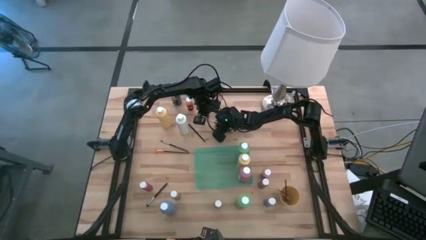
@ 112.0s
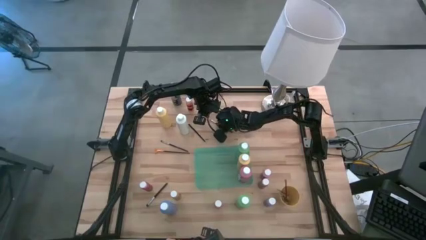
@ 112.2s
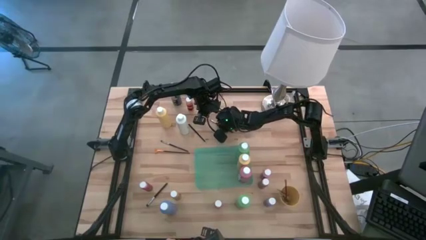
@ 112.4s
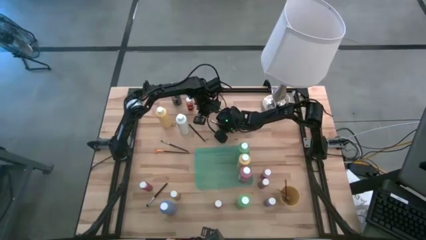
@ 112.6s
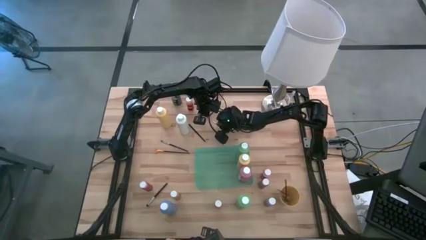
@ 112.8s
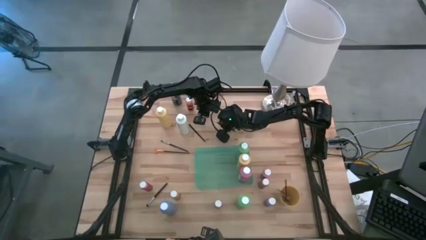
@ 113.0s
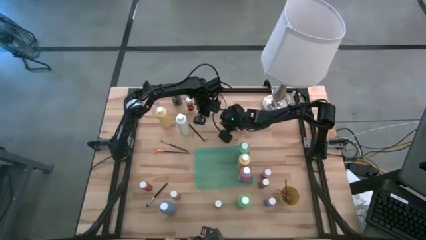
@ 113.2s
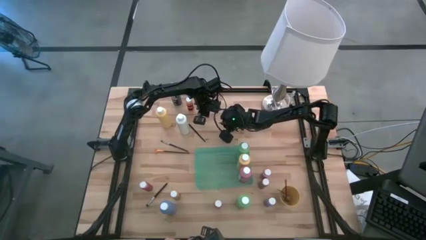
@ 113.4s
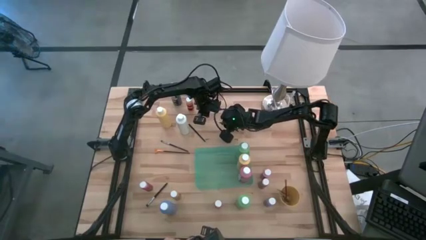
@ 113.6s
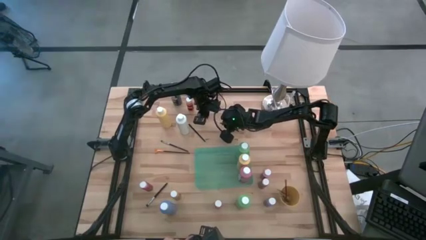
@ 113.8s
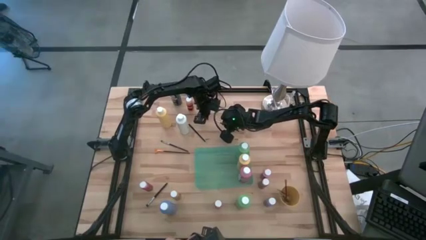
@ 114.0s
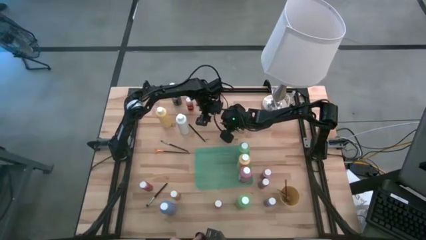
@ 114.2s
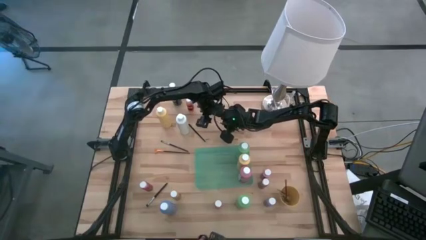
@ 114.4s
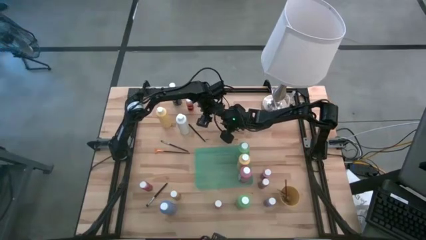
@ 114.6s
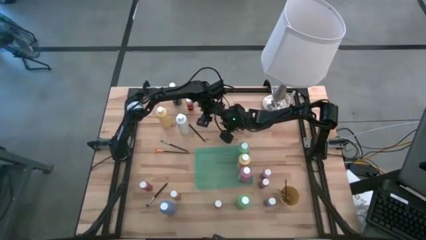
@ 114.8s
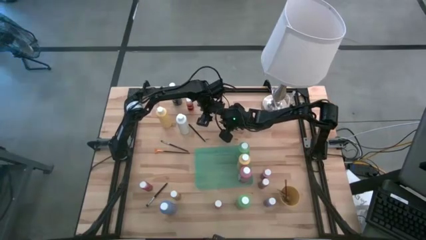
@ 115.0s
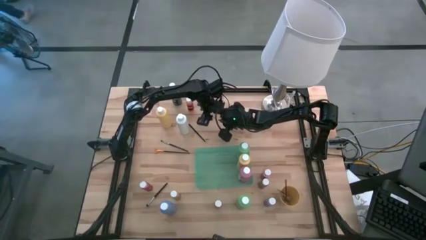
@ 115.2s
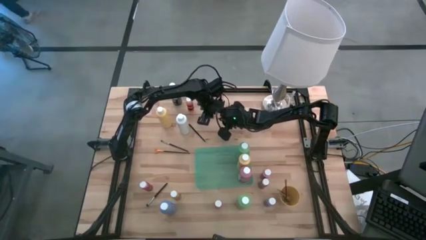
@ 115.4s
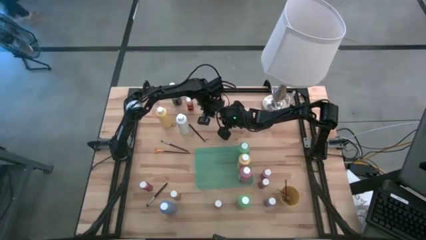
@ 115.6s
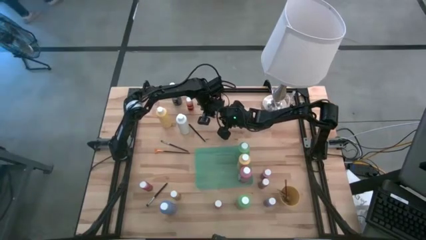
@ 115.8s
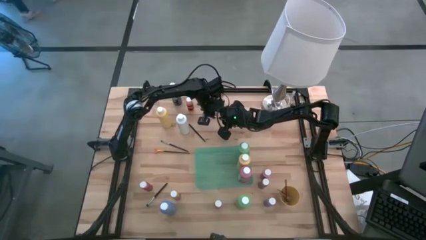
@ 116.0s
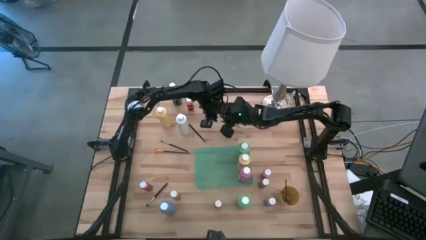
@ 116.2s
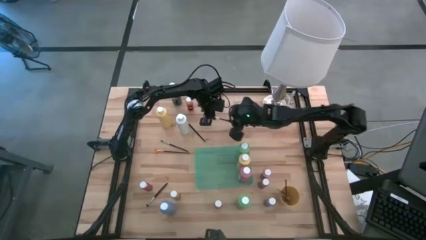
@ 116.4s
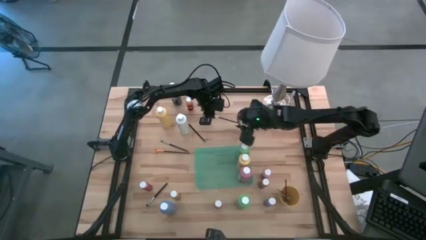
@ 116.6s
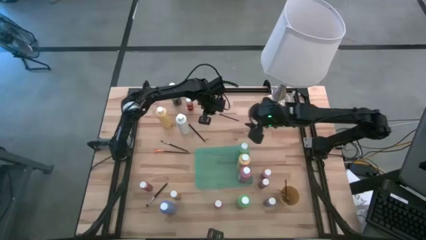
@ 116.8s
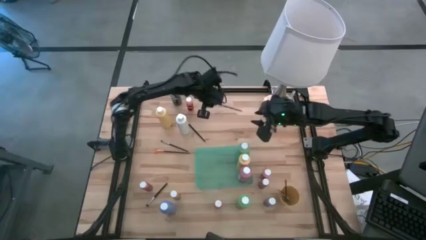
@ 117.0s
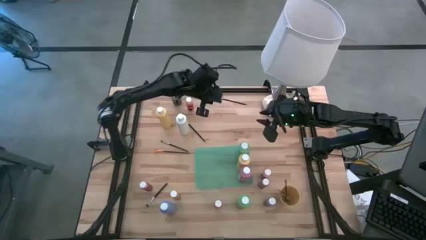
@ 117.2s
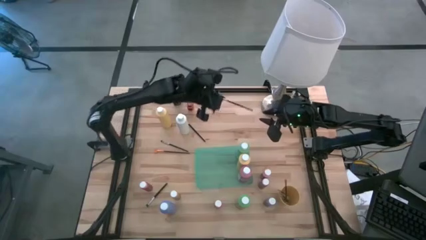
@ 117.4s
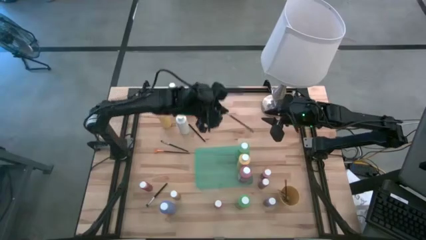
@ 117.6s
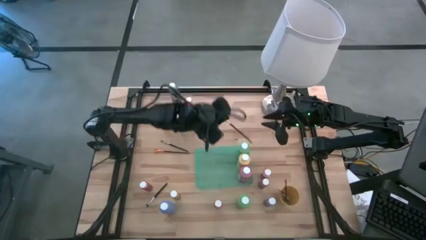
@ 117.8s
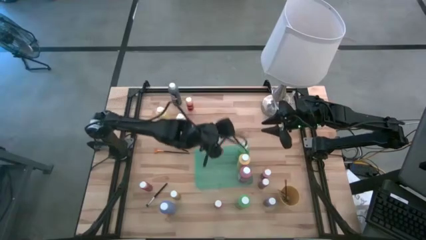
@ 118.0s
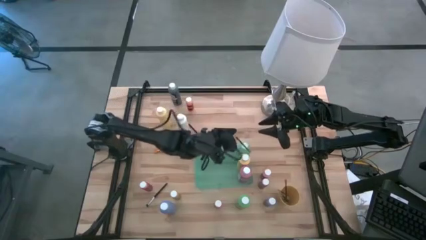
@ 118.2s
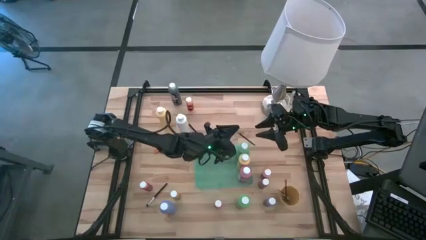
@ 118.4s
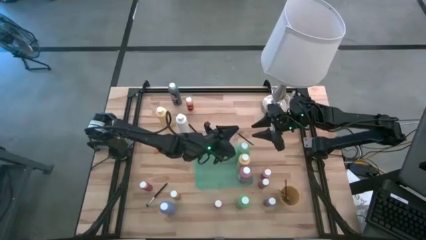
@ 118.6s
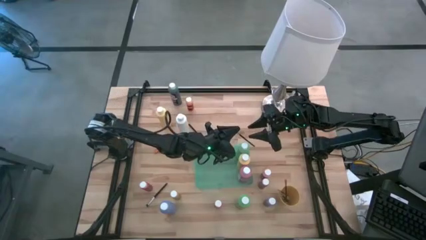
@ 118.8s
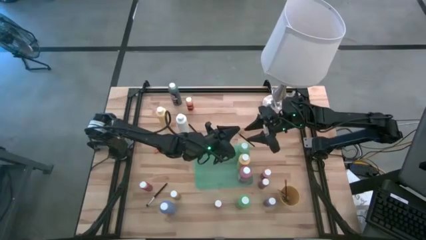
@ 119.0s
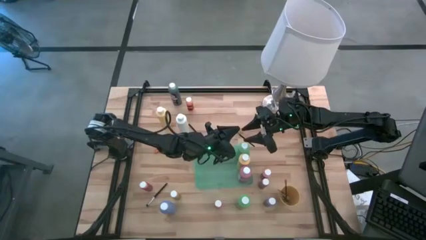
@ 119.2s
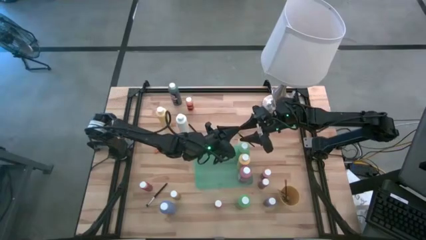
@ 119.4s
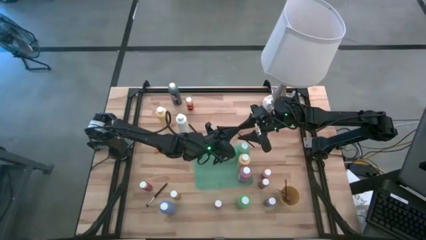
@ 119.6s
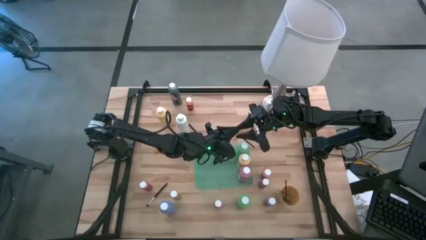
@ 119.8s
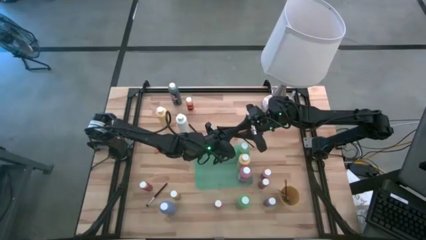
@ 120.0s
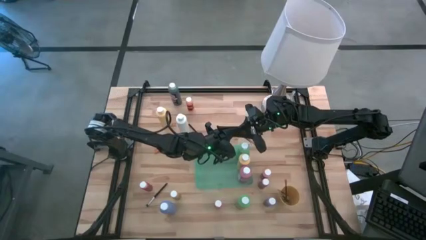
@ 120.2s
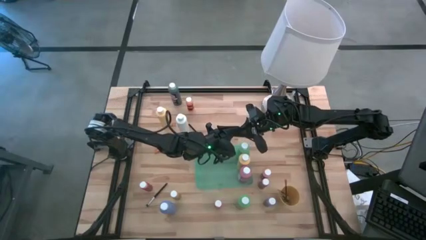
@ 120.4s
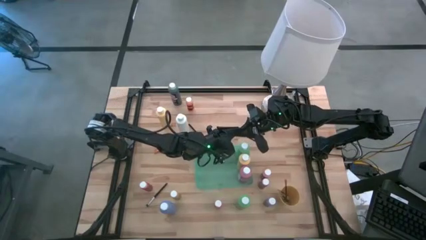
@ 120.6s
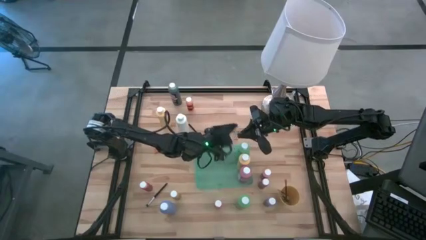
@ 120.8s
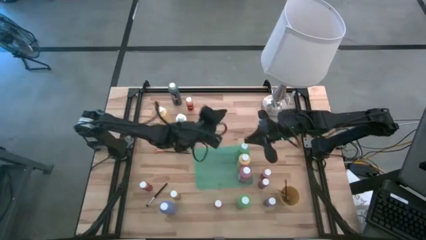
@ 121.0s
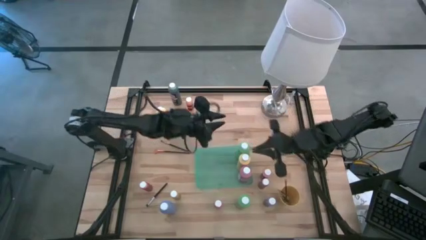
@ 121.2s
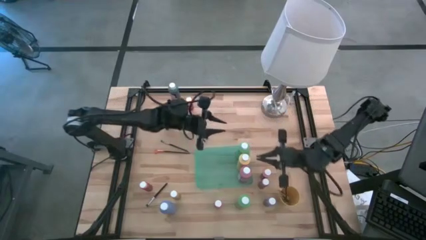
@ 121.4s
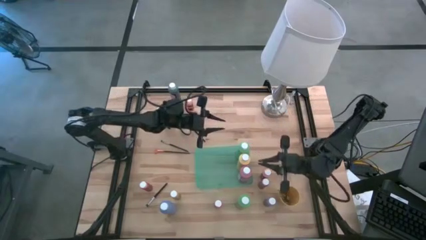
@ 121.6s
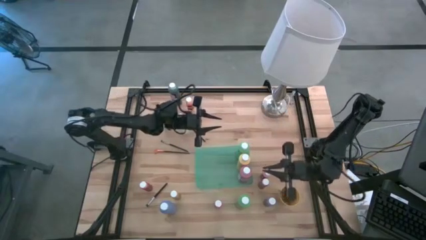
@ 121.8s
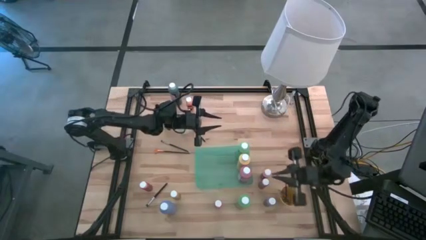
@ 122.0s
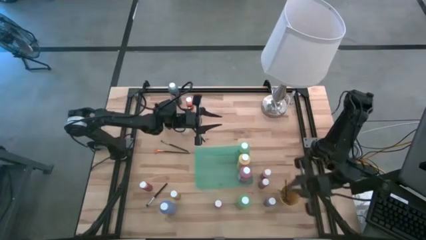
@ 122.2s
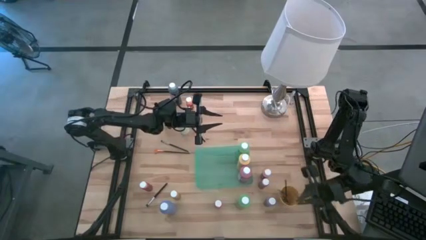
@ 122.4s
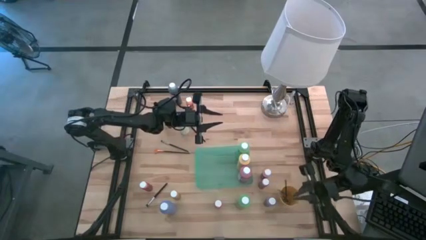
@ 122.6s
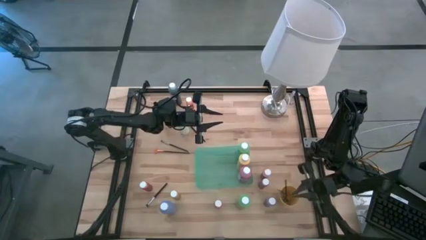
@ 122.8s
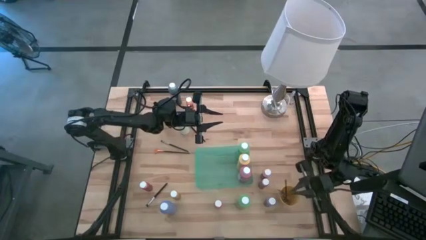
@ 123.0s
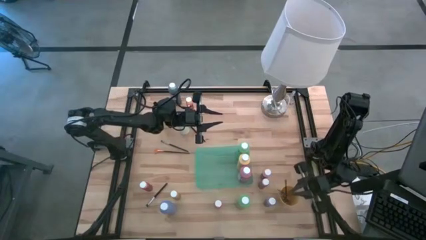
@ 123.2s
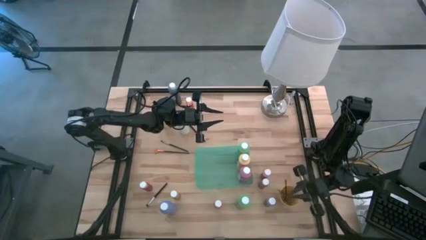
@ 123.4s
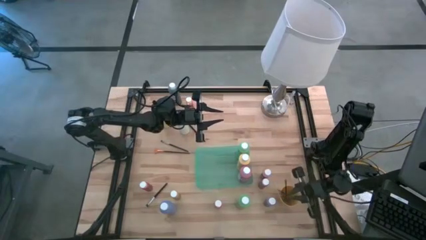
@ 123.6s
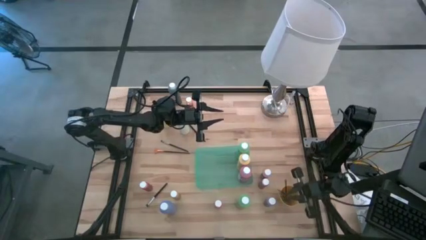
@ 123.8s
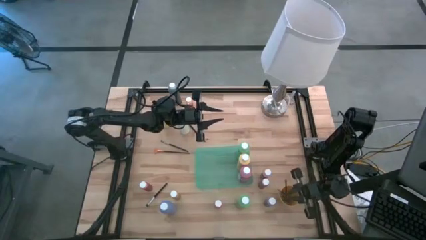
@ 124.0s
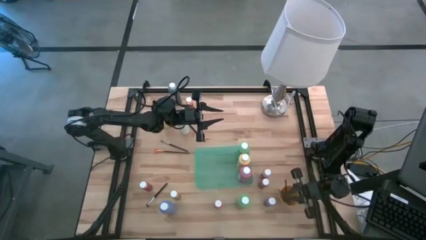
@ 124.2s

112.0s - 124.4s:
Task: Pick & Place Paint Supplies
Put the silver paintbrush into the yellow cup
